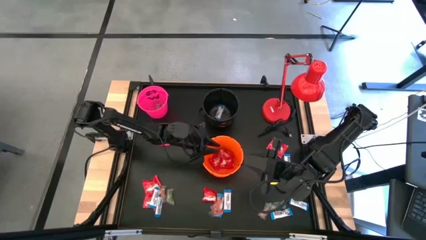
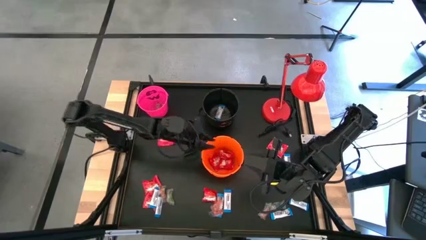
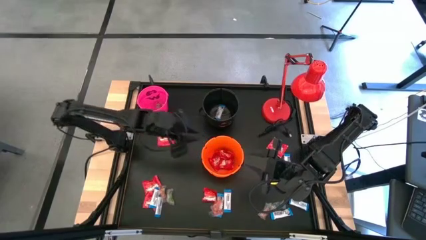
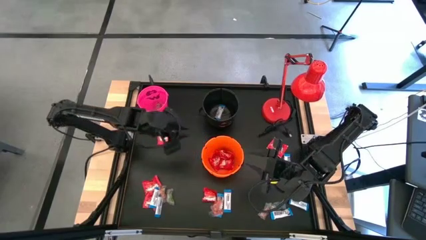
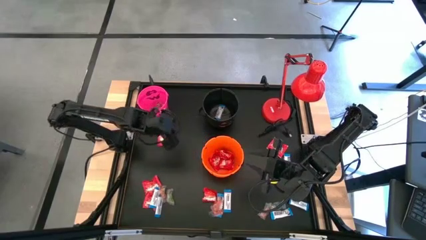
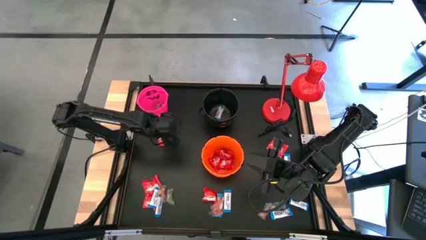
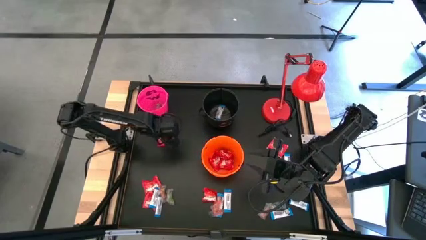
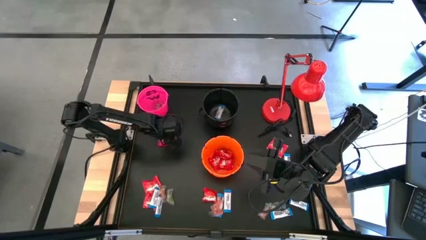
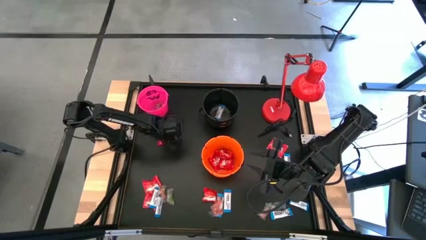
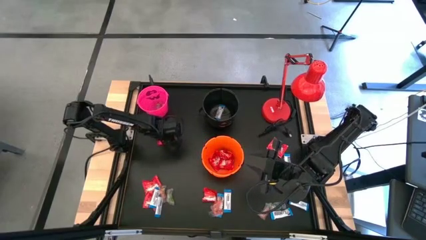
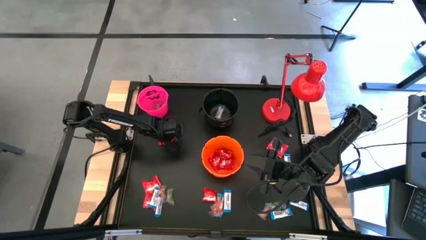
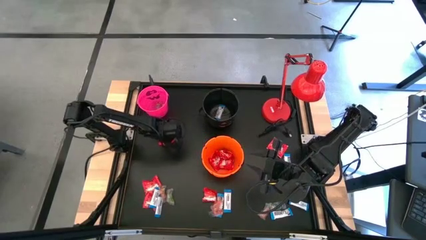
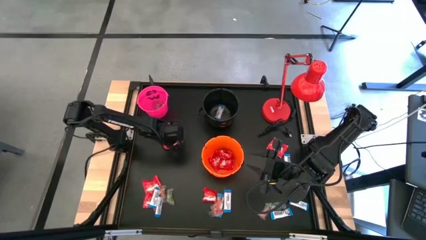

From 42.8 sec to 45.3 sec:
Task: Sort candy
Put the red candy into the orange bucket

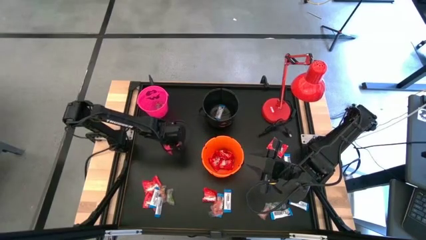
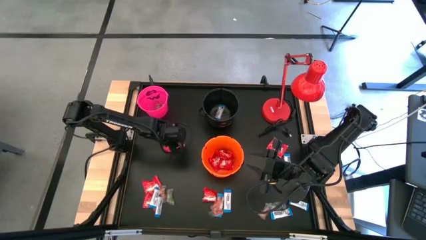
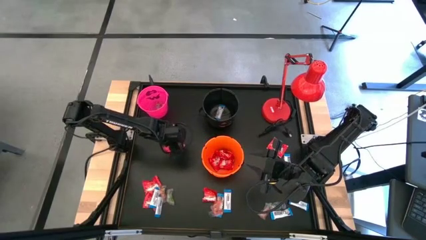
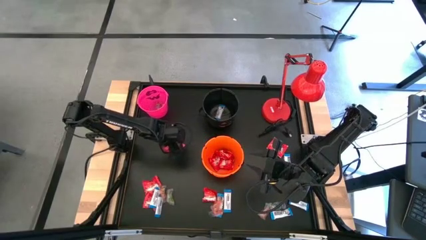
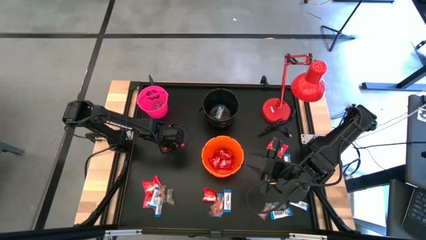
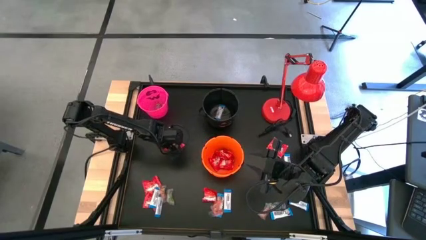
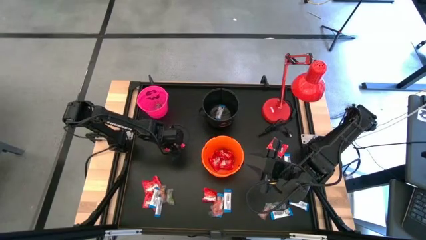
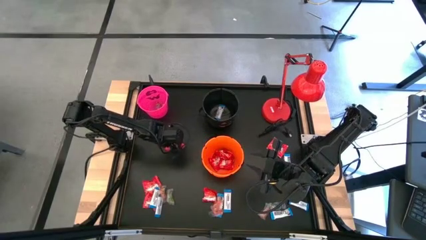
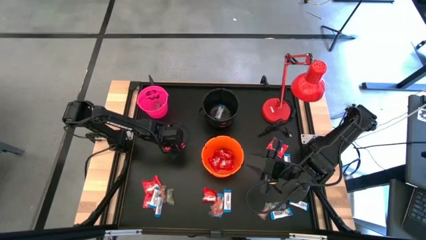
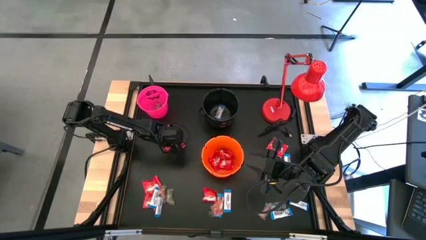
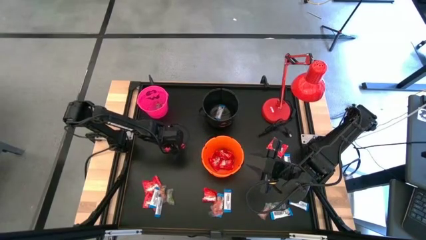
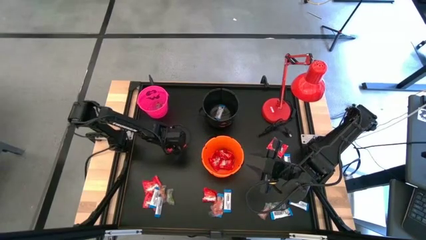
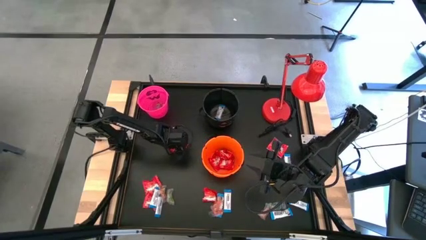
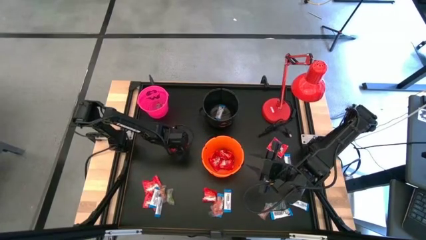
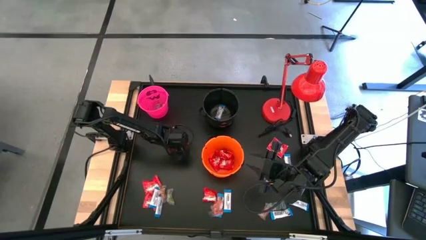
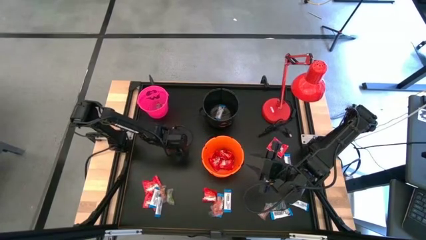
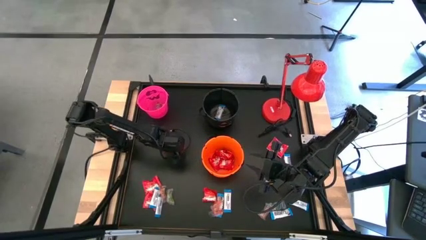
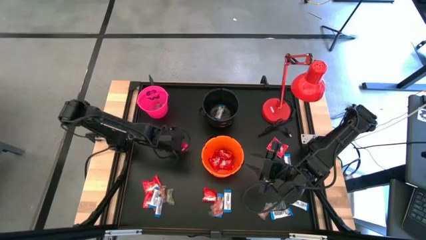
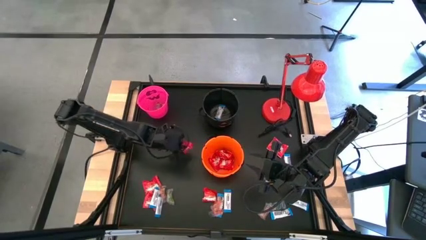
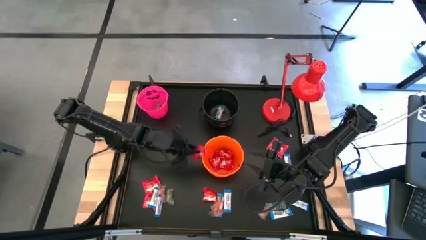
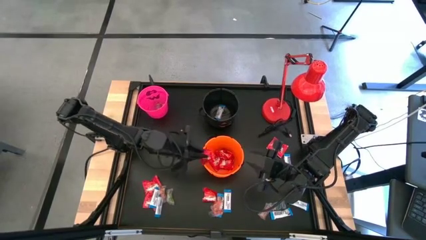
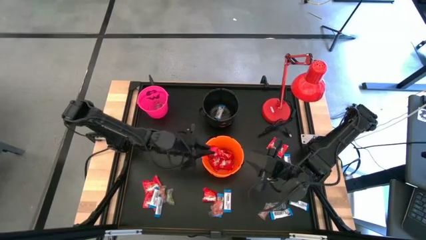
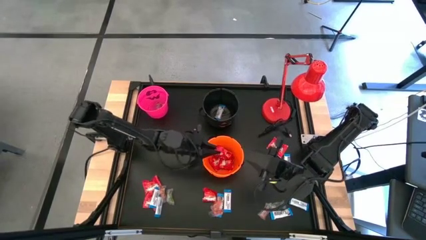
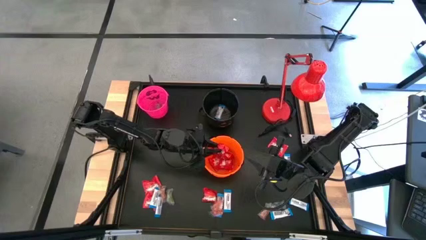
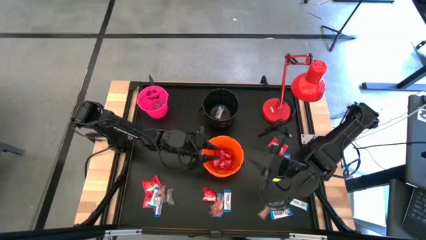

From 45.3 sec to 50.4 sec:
Put the red candy into the orange bucket

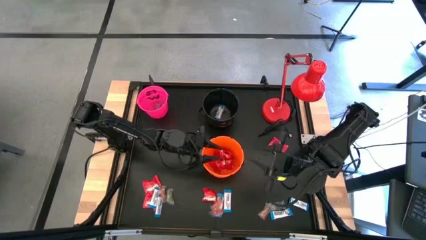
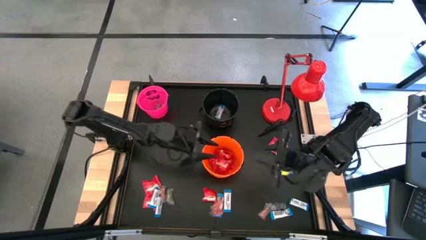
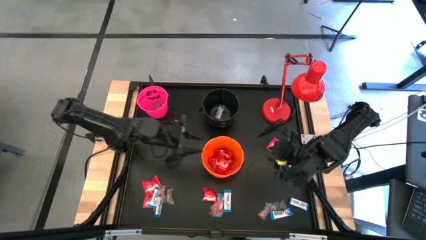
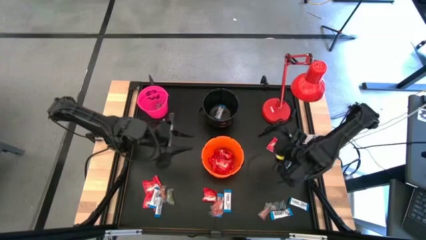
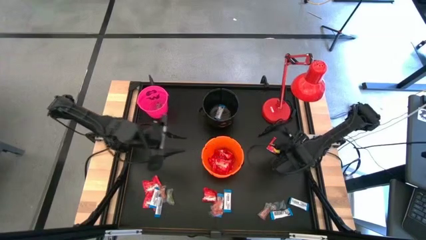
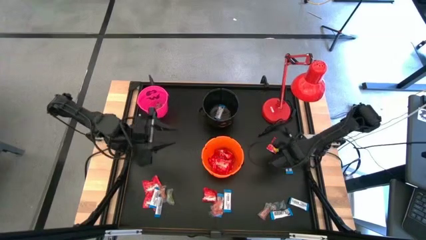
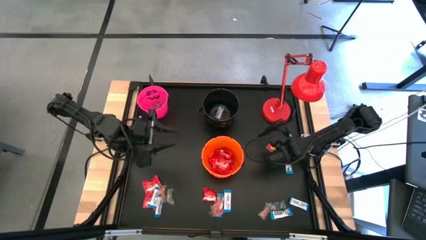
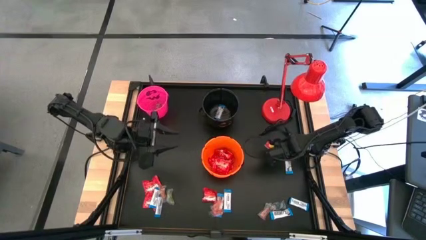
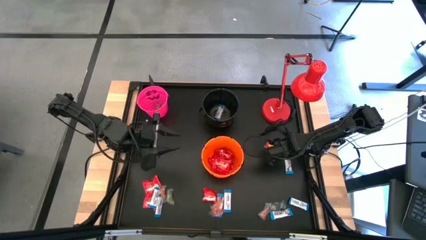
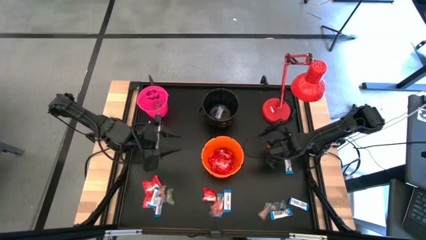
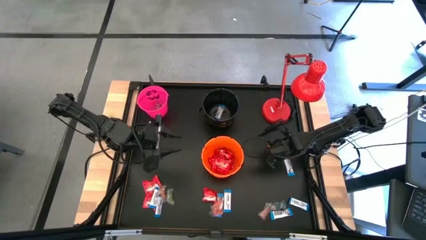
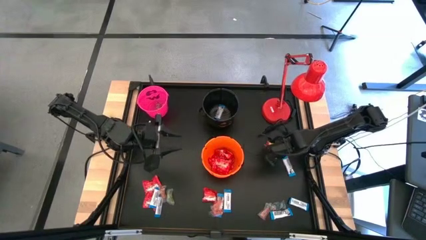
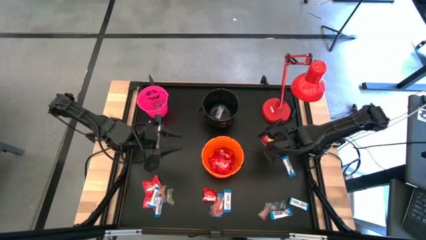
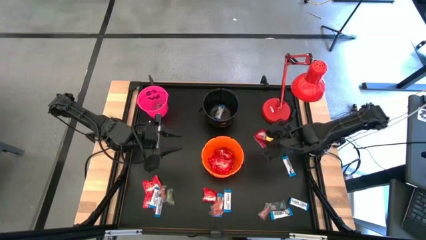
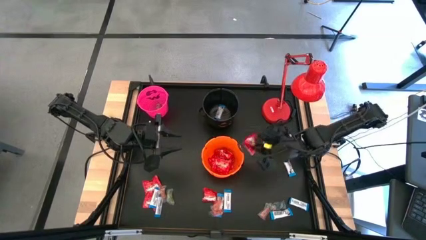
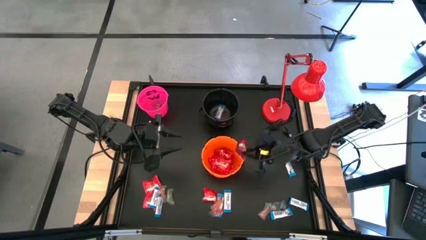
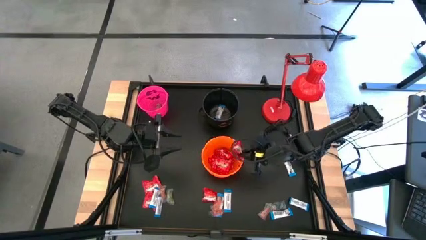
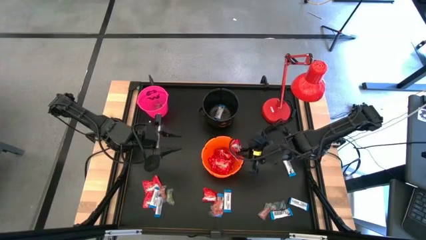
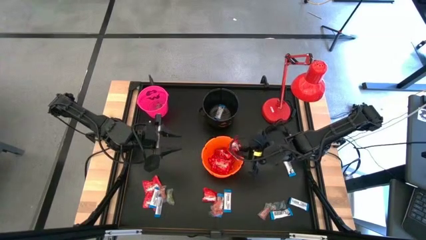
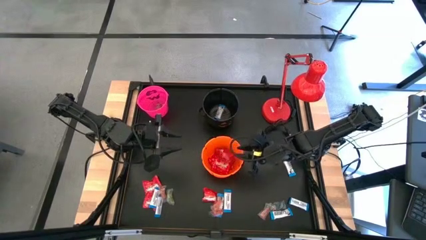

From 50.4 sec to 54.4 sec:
Put the red candy into the orange bucket

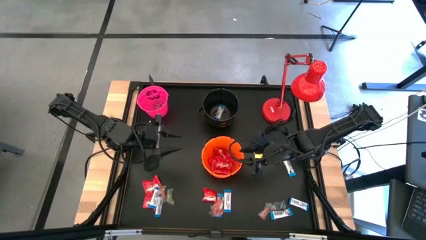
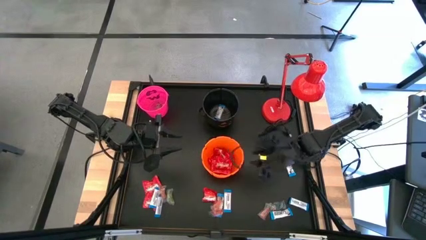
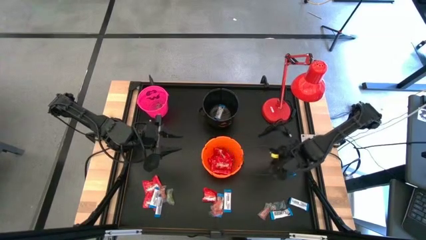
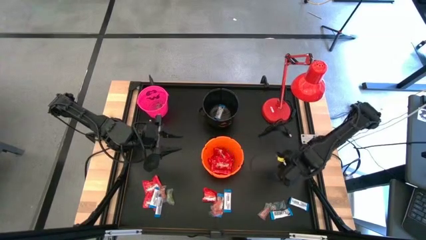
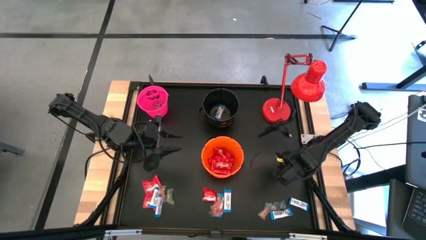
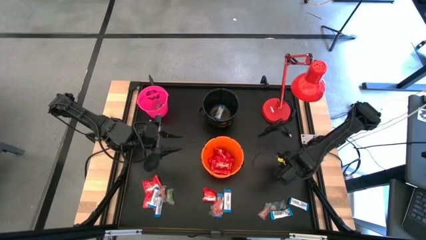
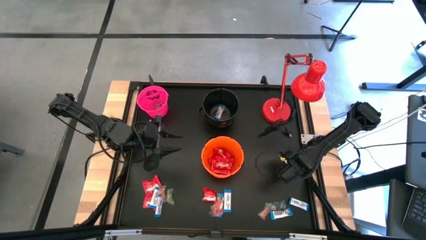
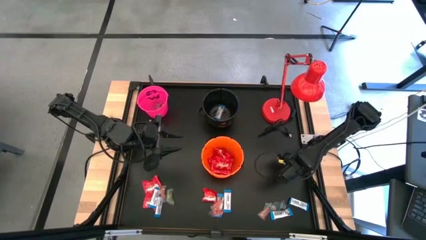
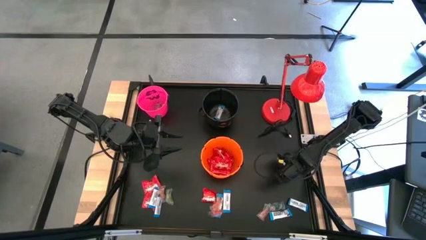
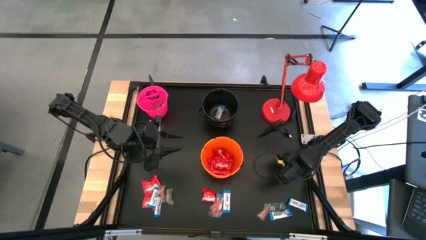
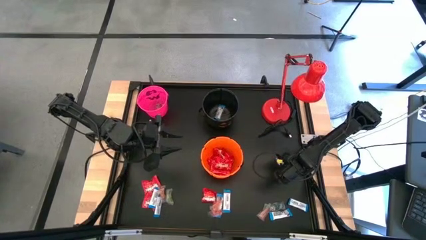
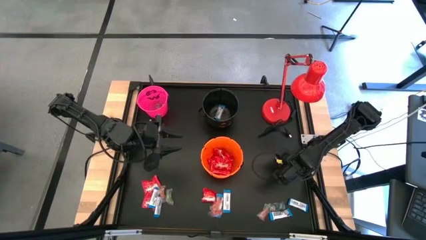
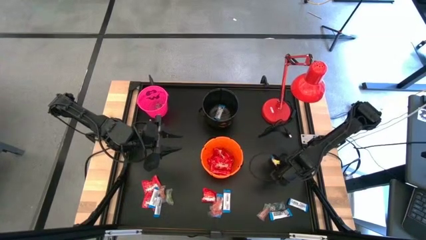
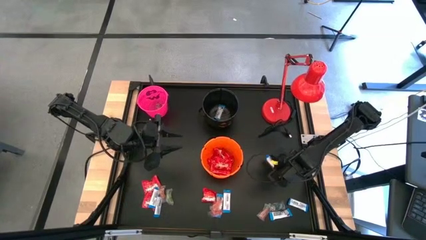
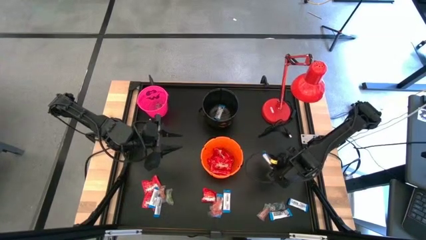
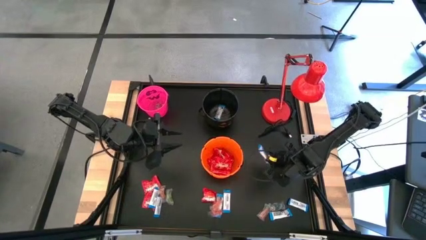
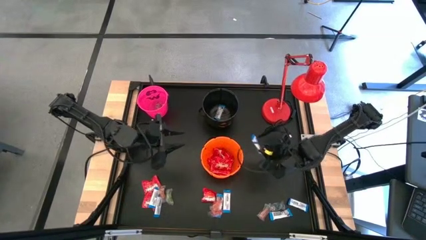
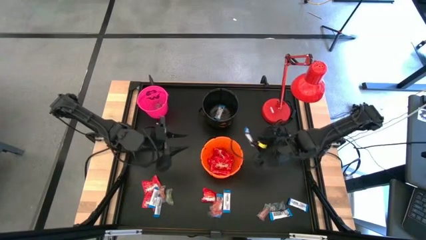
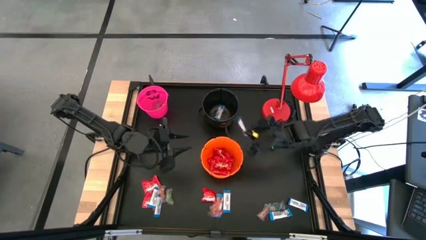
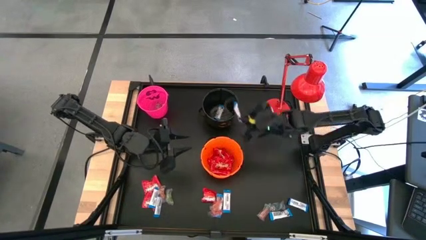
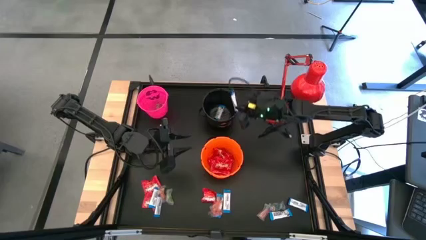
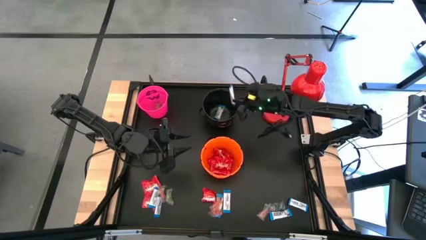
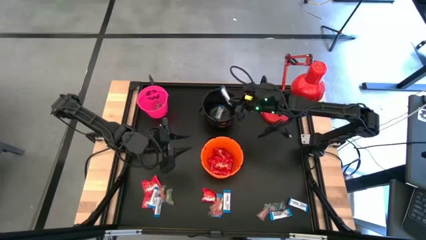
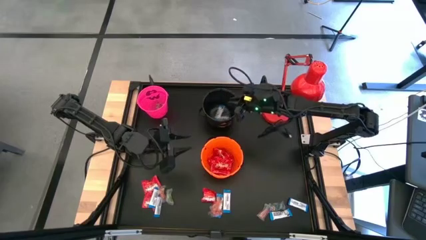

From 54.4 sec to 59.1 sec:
Put the white chocolate into the black bucket
